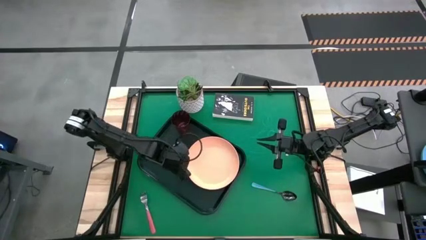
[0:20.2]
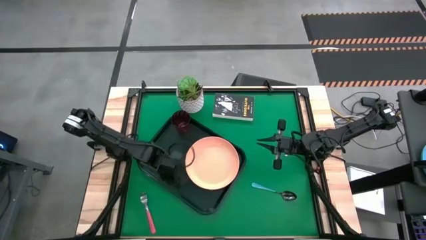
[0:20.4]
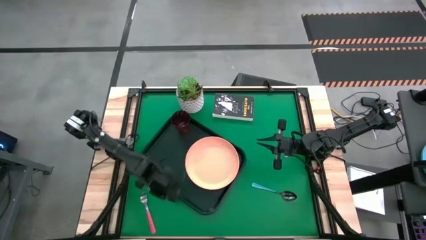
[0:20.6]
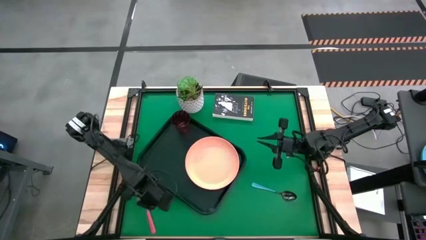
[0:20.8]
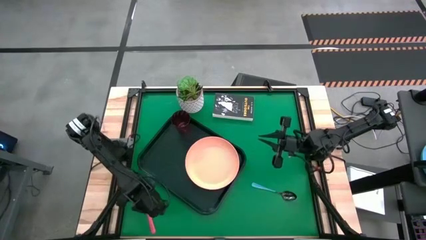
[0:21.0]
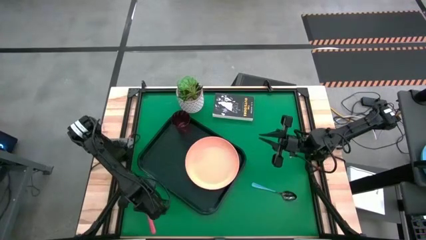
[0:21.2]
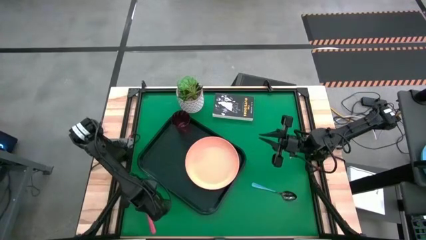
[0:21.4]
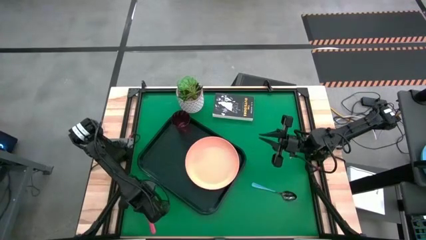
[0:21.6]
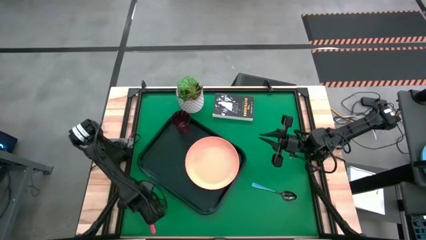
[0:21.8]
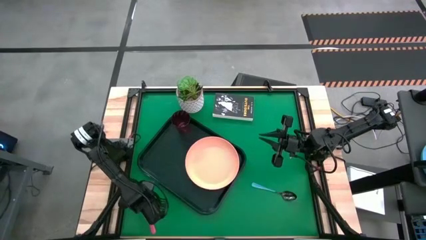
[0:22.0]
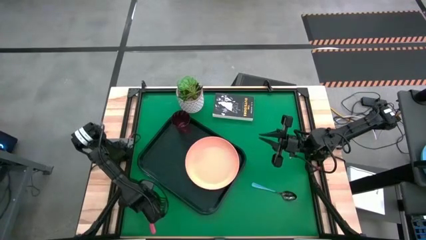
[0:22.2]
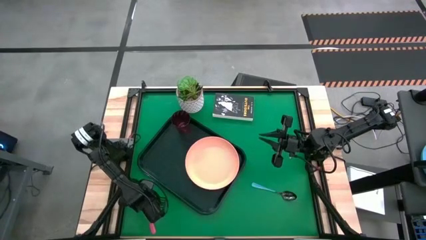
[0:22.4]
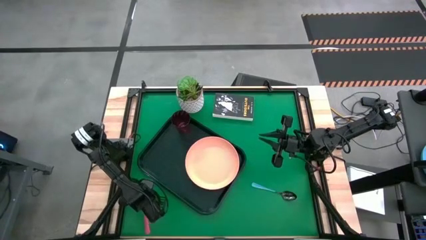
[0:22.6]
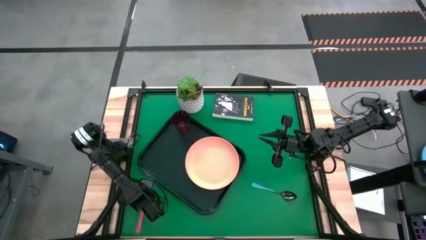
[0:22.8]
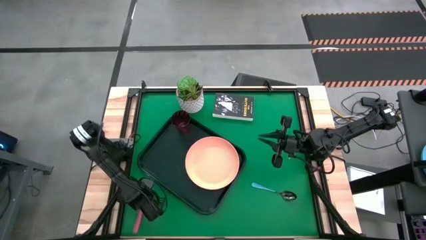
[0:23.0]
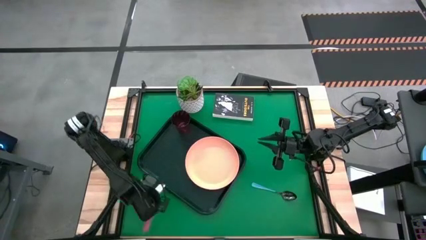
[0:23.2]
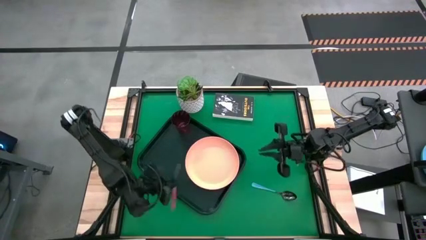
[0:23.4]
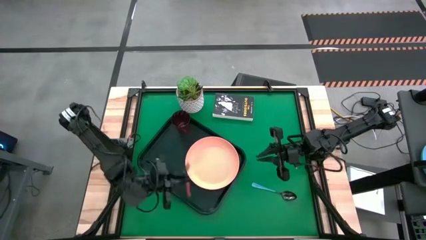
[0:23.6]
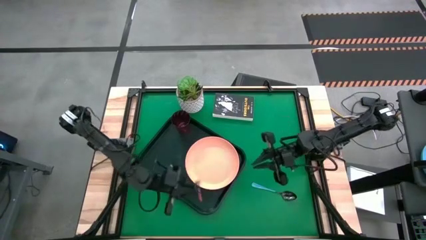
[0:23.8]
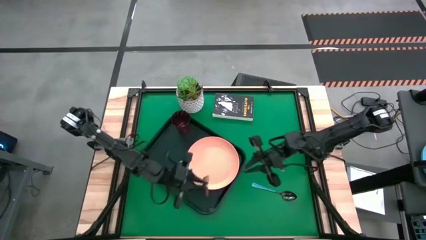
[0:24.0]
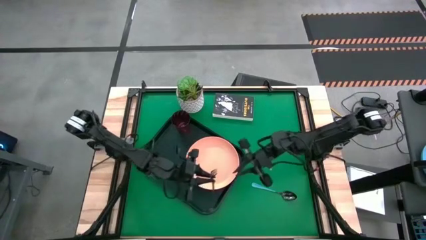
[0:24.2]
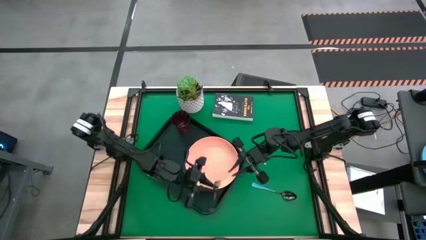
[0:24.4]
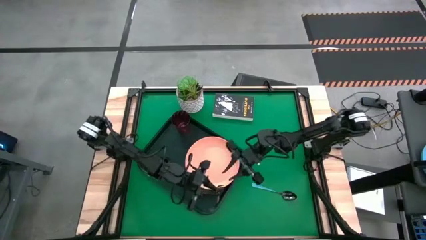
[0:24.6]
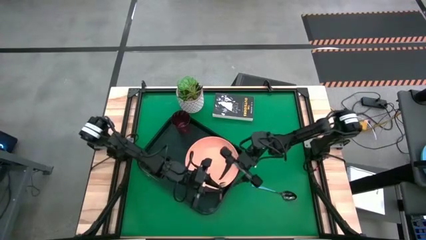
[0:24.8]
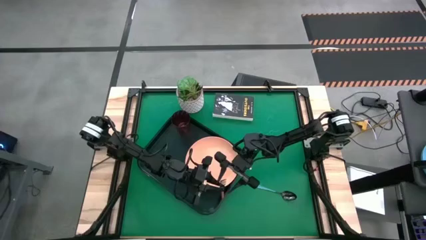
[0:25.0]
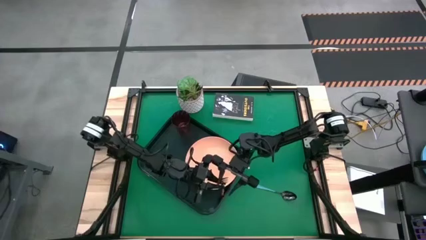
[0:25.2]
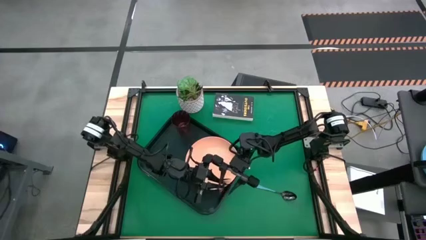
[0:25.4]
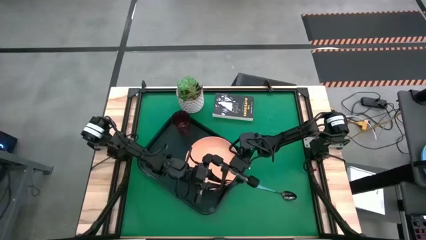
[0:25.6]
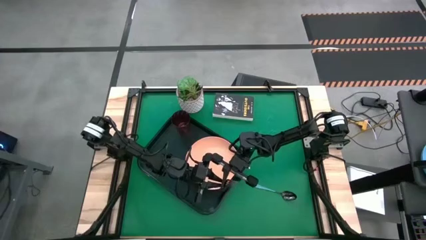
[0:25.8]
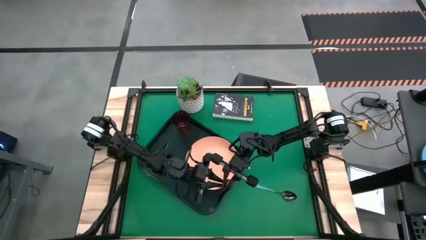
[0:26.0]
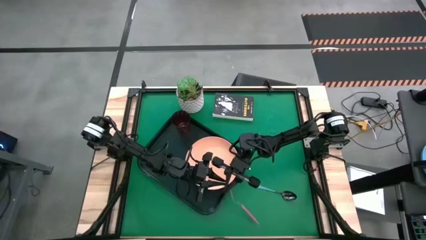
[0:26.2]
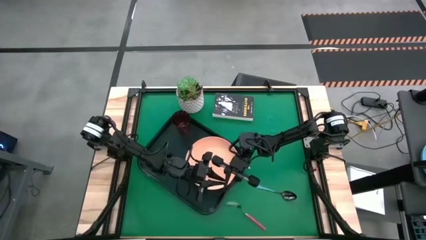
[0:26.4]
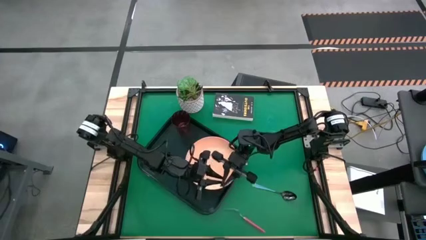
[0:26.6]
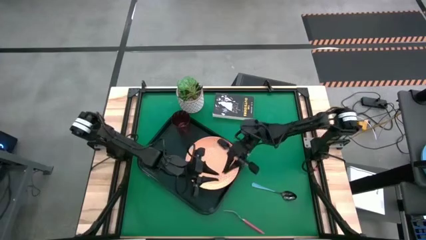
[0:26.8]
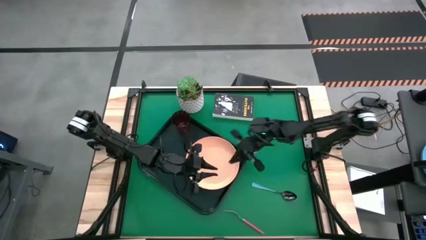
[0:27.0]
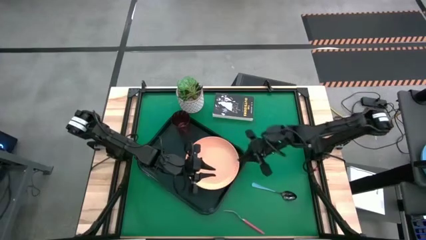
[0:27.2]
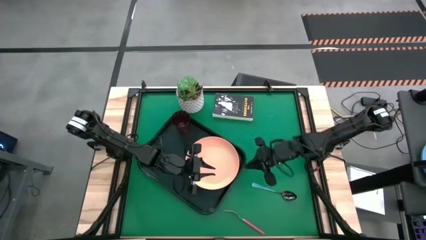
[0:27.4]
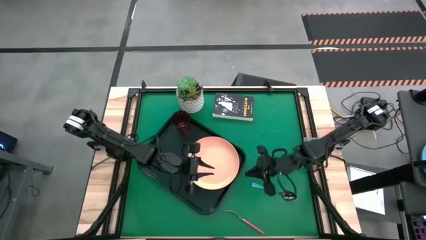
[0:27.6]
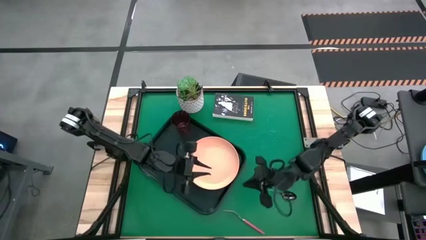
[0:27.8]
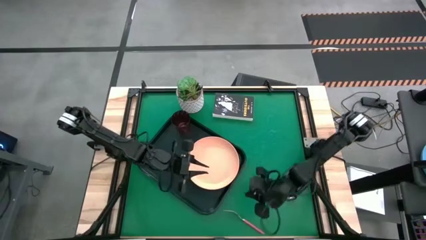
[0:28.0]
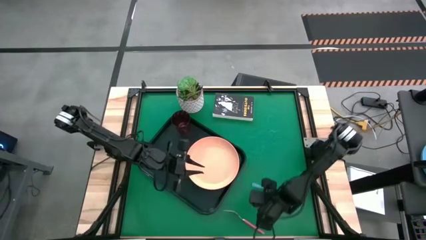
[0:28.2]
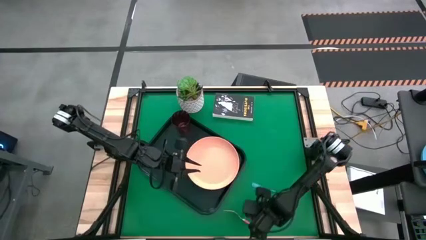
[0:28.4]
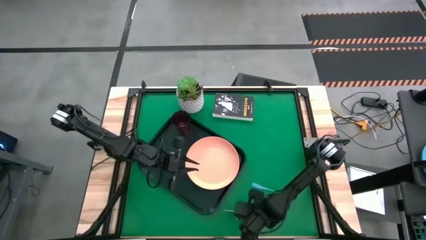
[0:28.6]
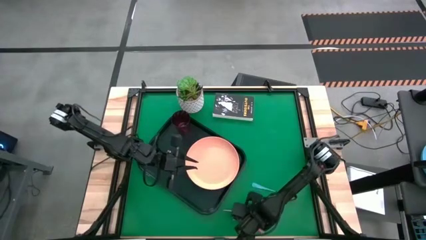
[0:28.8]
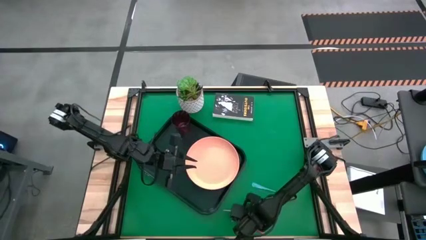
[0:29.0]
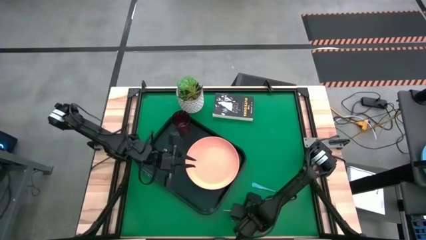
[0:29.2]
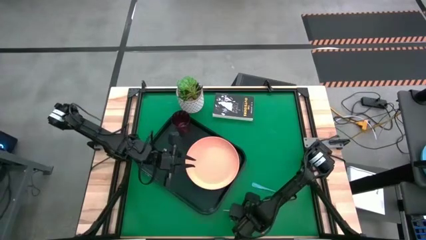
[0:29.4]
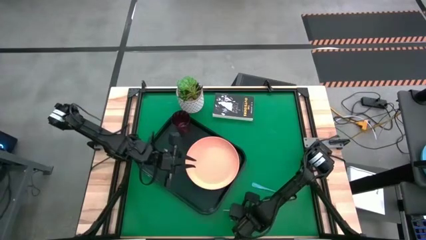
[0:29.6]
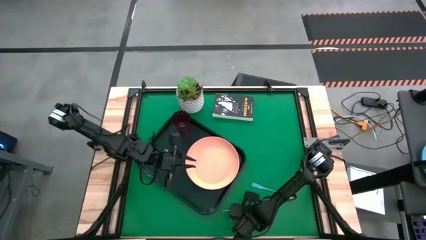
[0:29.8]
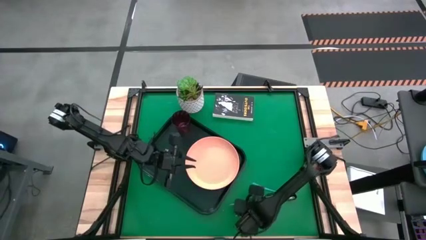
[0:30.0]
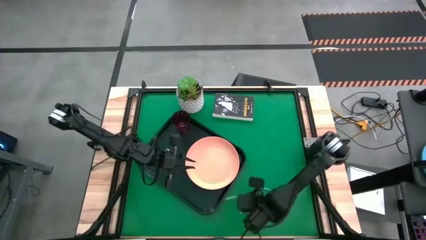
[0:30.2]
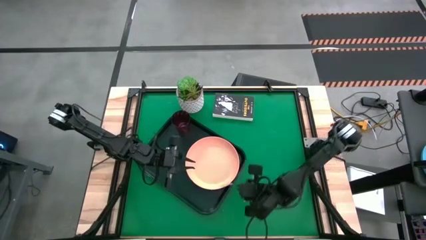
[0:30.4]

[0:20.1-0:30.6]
Task: Pick and place plate/cup/fork/spoon on tray
Put the pink fork on the black tray to the bottom of the red cup

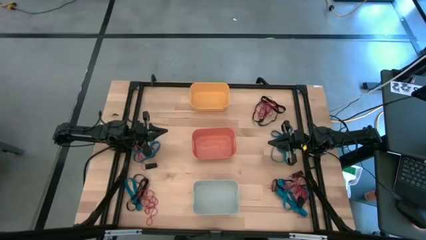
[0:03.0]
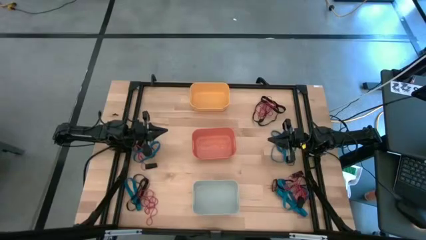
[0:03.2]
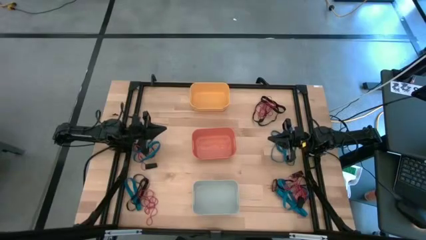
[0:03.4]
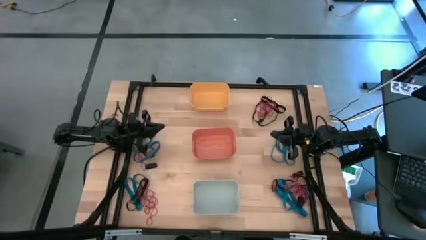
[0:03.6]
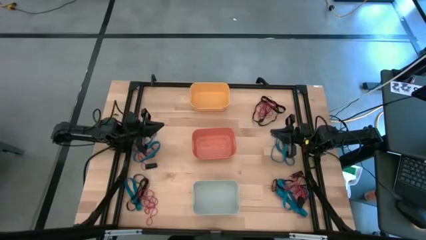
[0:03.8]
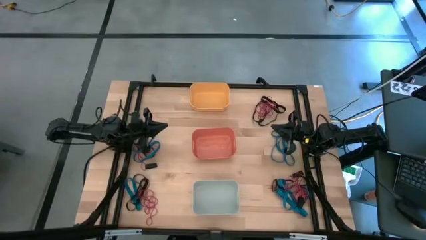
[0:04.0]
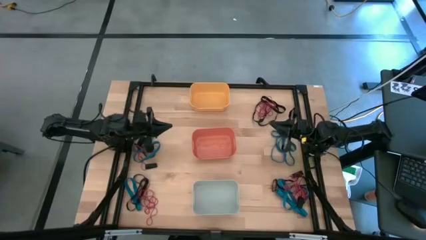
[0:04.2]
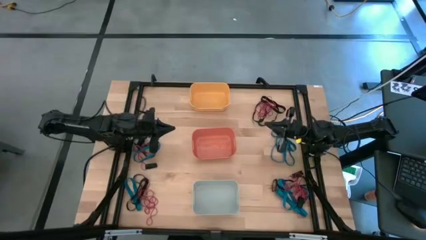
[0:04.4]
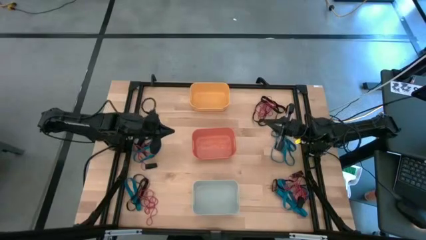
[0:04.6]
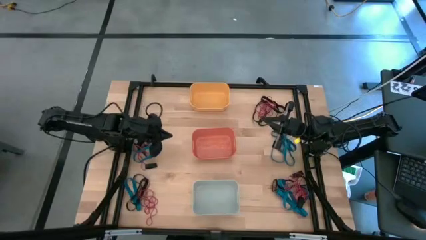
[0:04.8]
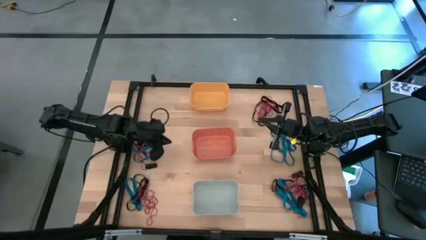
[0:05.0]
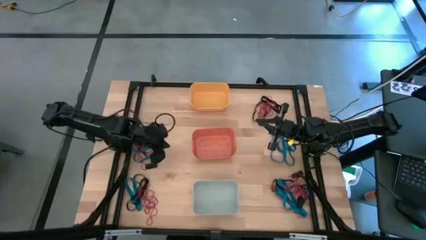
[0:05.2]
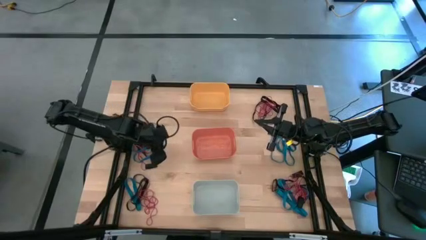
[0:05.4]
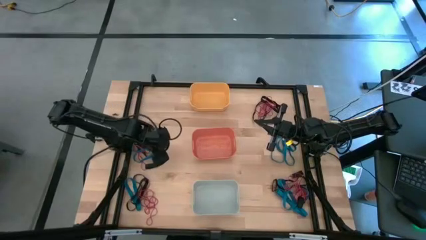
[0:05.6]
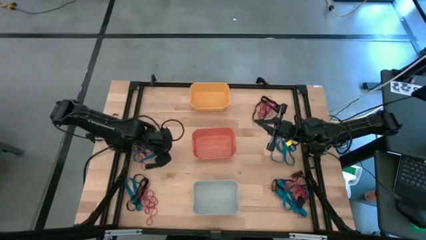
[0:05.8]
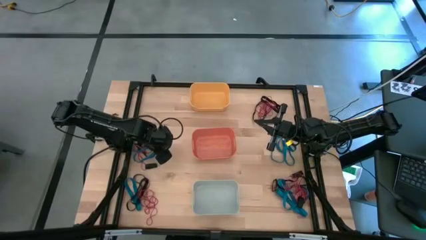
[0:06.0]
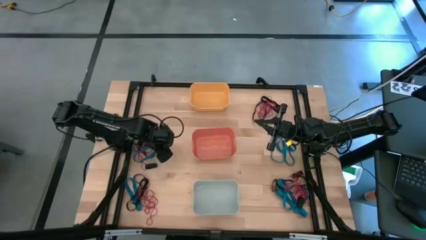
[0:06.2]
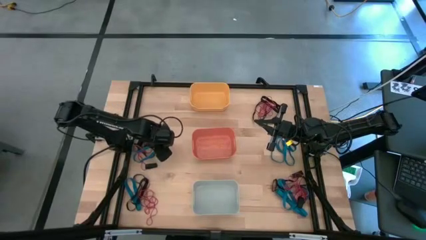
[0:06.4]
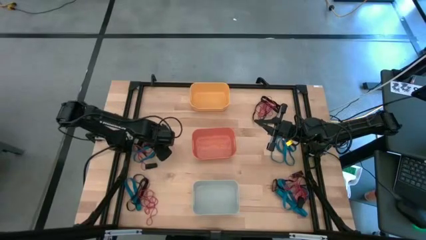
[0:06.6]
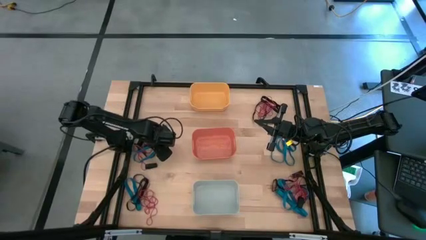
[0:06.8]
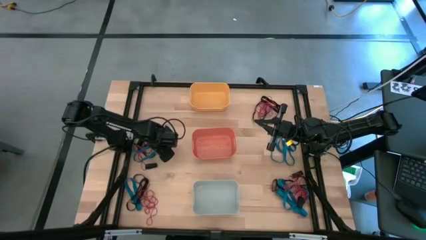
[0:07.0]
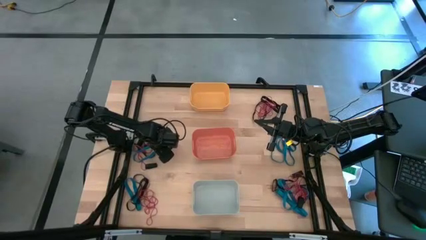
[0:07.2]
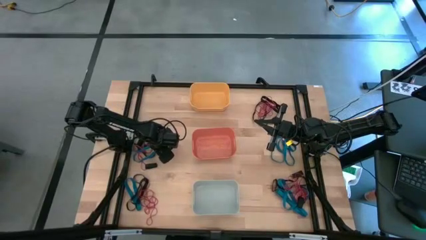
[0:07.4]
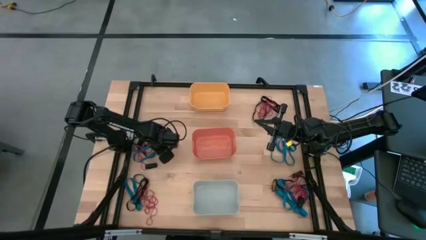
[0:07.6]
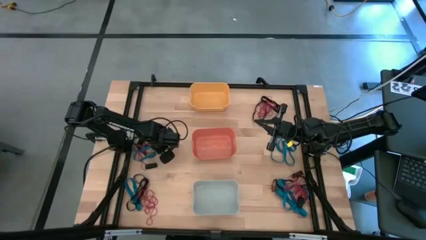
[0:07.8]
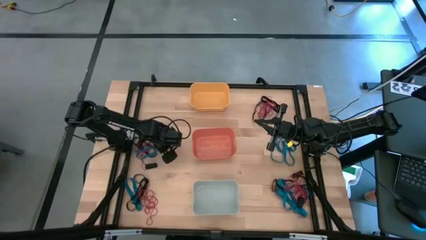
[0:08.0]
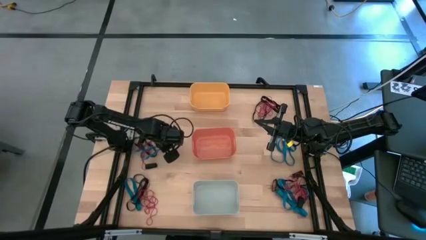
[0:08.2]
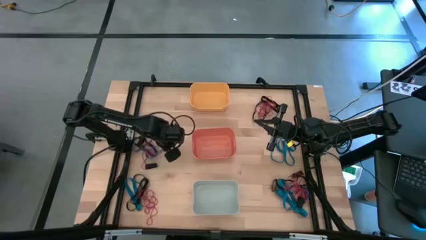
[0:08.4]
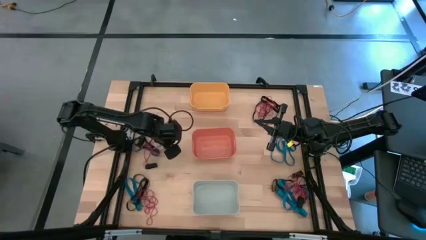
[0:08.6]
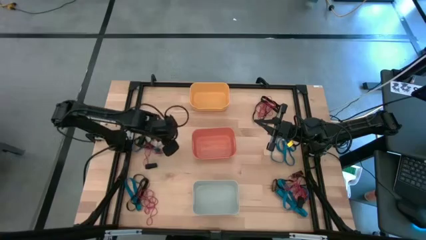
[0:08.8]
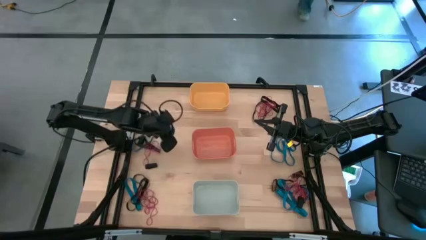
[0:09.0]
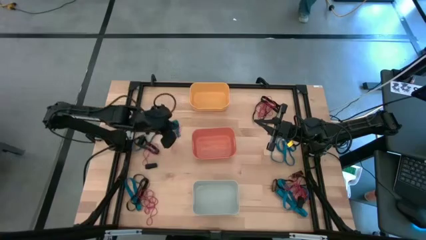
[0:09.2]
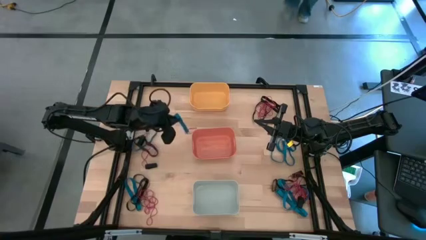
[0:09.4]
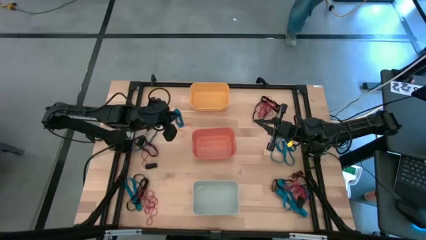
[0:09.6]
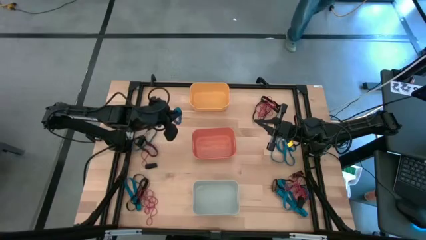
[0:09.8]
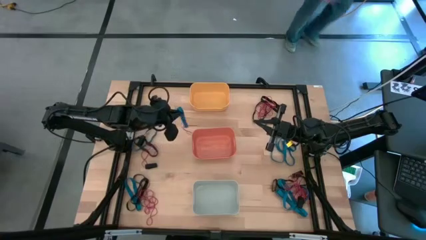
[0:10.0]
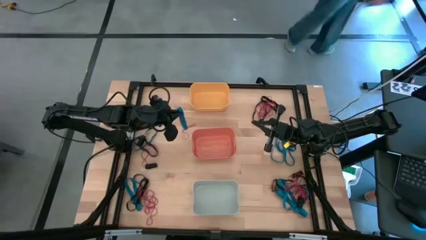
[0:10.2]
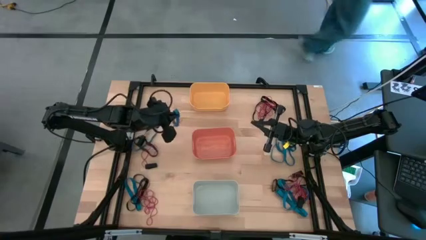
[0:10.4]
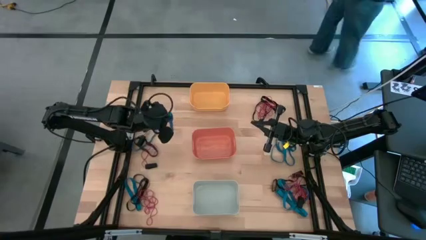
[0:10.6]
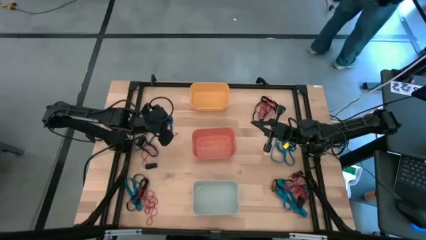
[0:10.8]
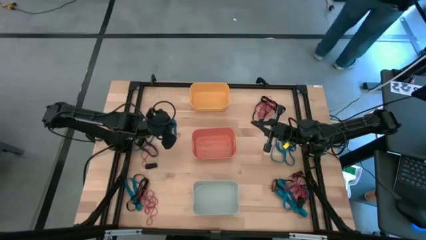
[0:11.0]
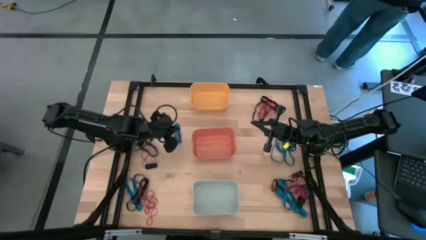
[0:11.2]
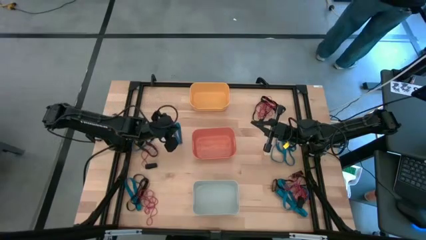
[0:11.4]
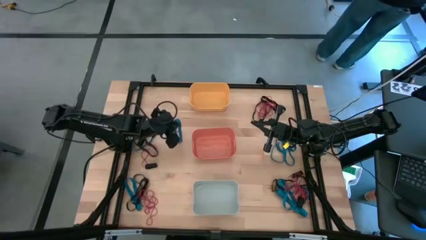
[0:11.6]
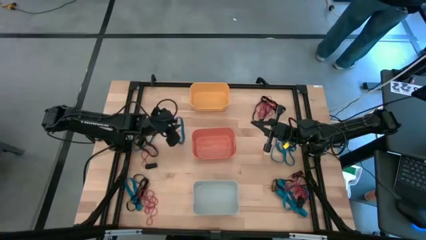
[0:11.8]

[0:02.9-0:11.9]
Task: Sort rubber bands into baskets
Put the blue rubber band in the yellow bin
